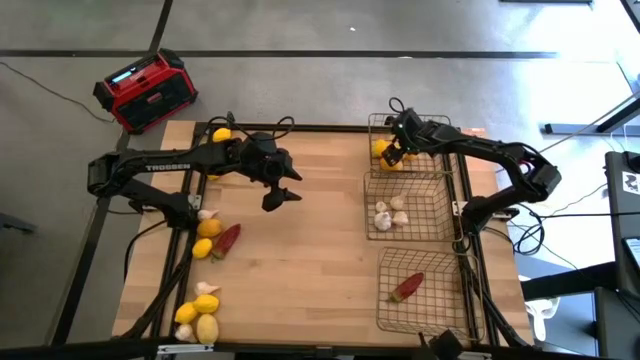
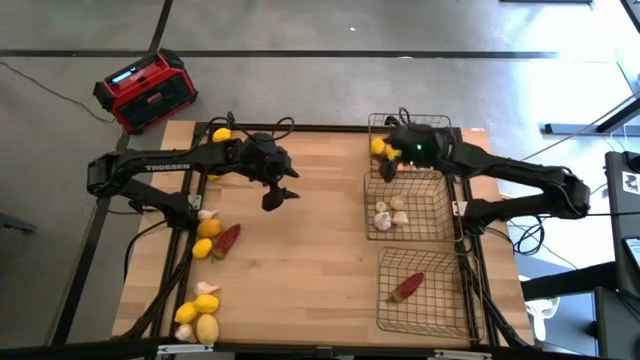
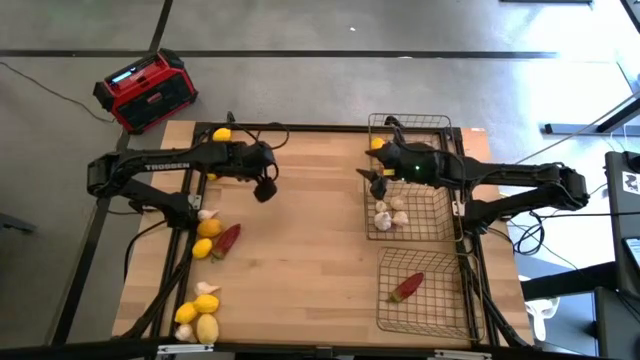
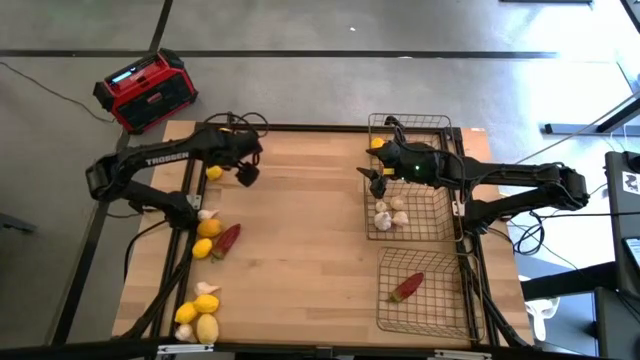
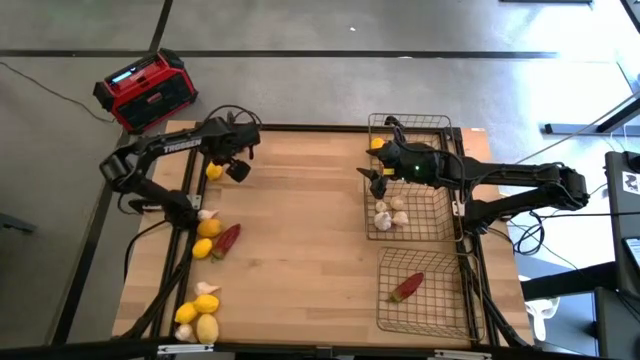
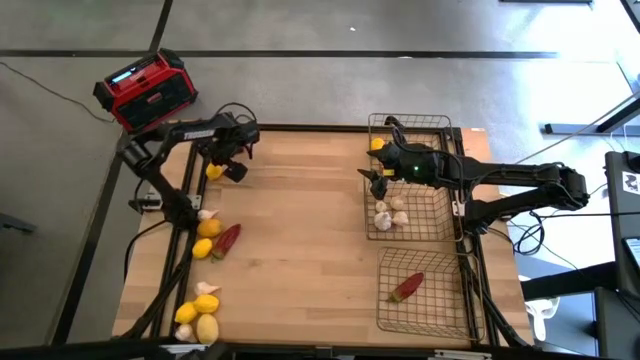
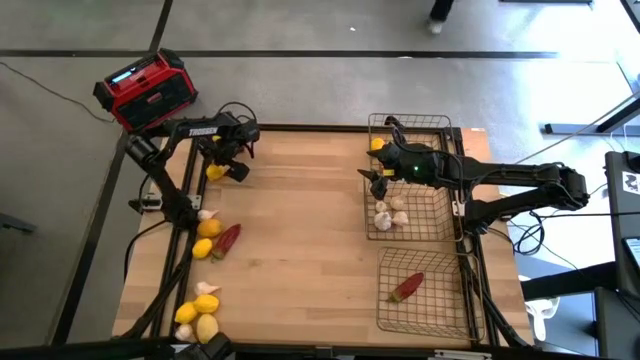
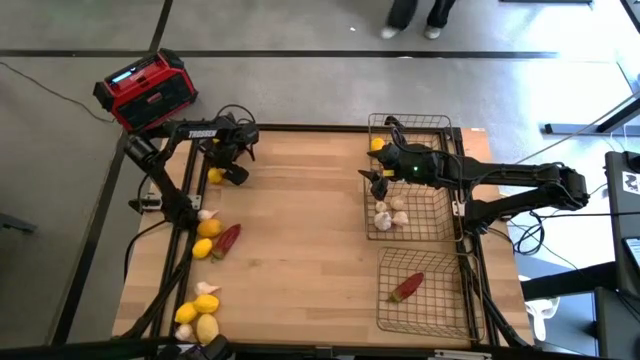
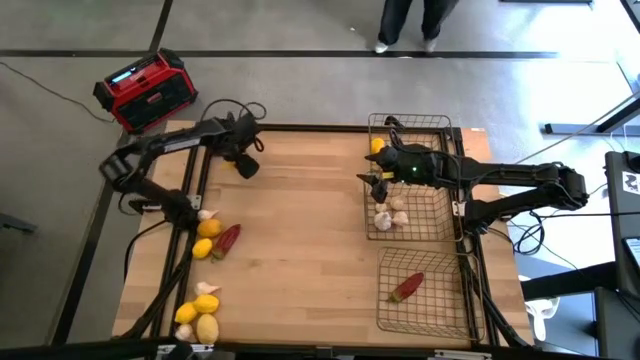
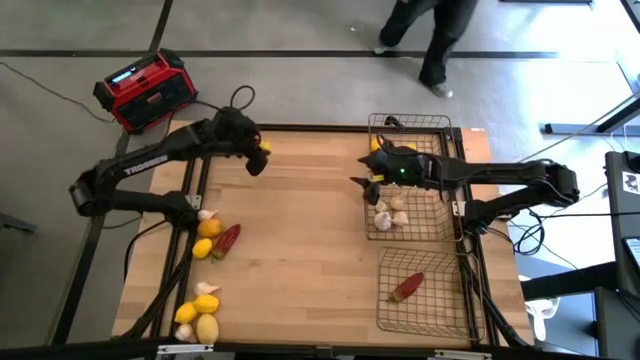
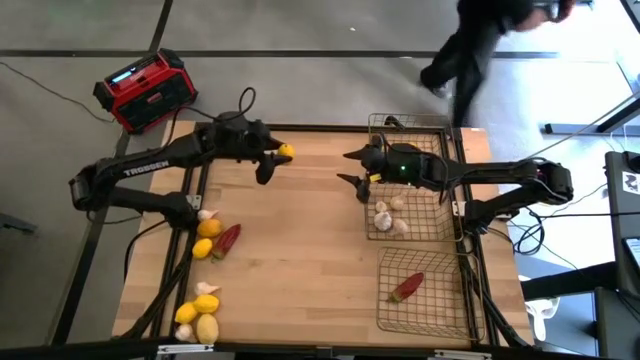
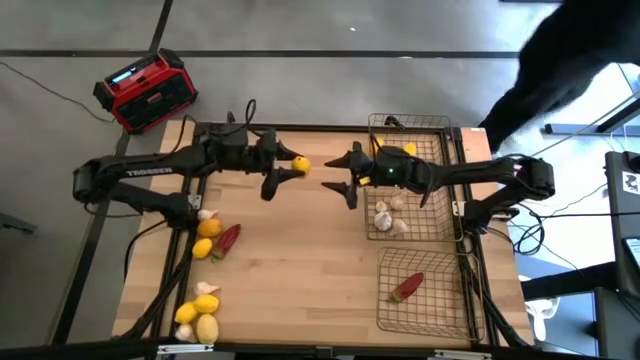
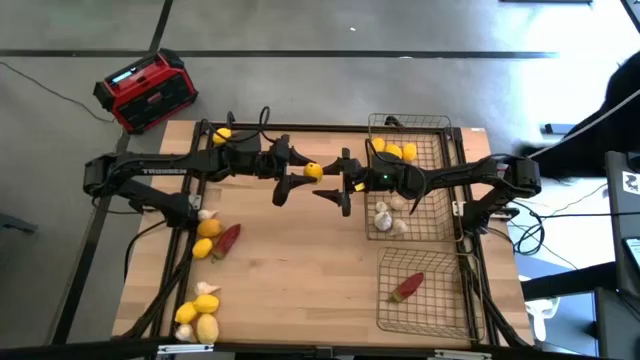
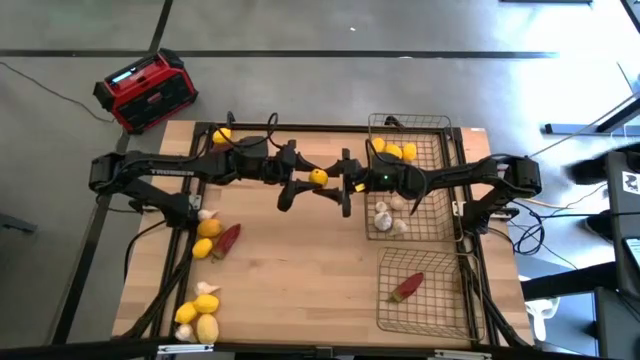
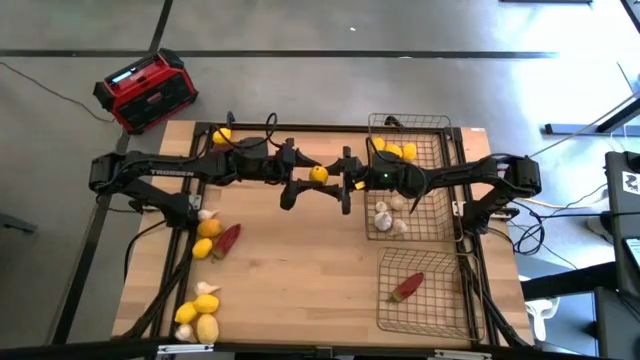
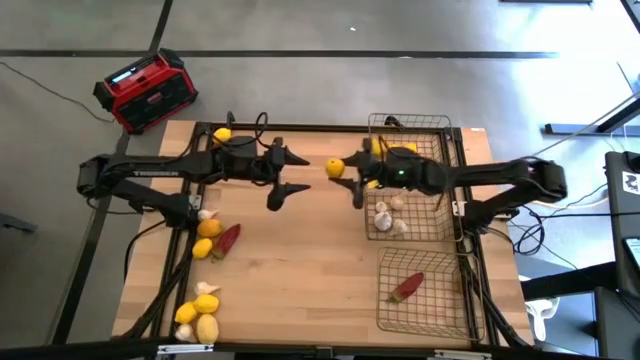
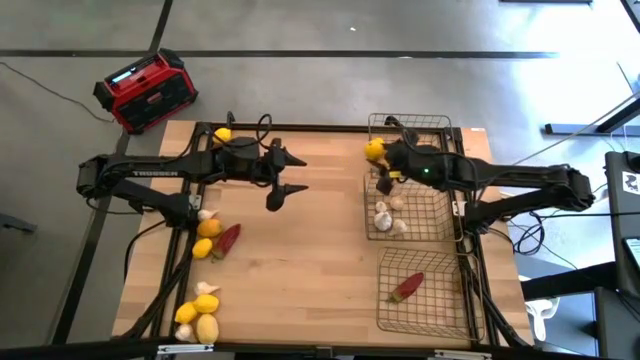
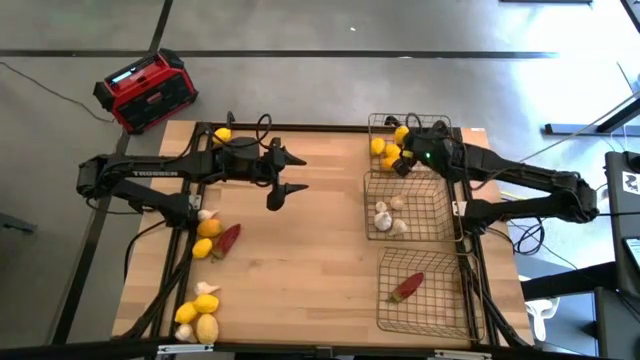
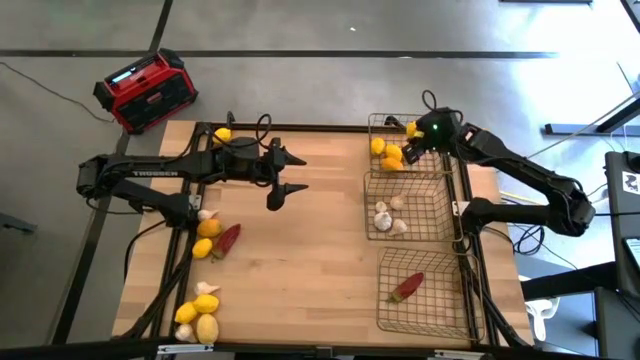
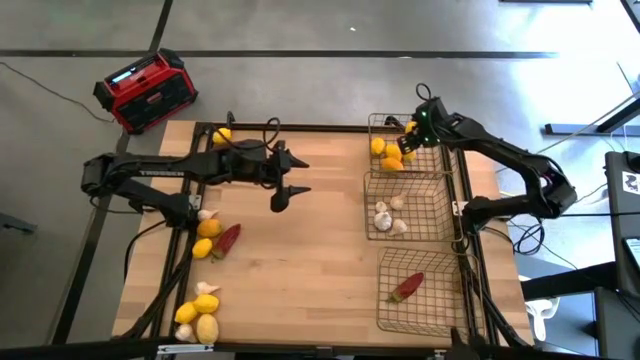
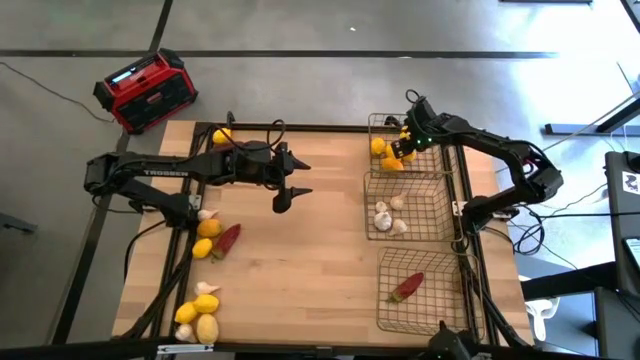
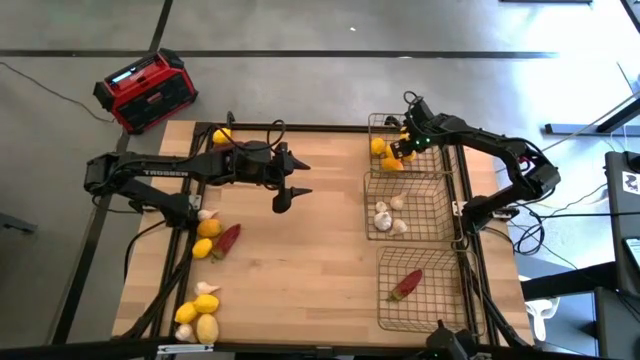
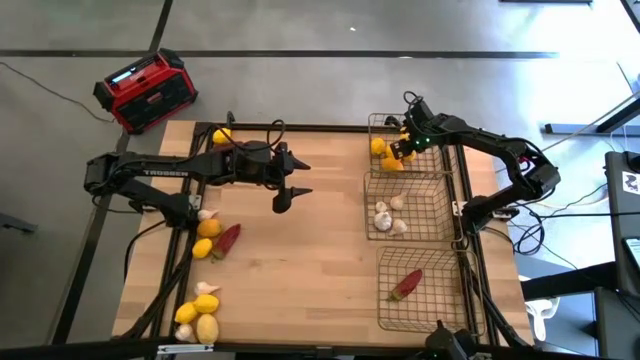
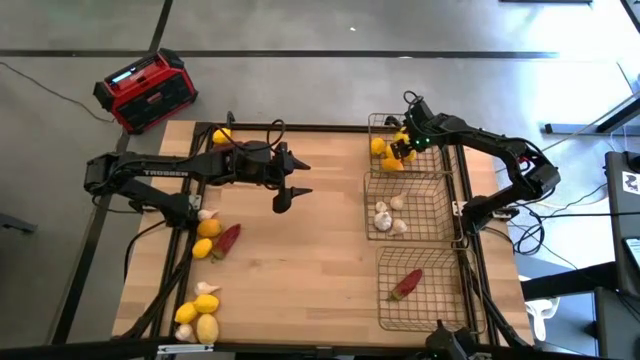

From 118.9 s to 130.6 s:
Task: Sort produce into baskets
Put the yellow lemon into the top wire basket

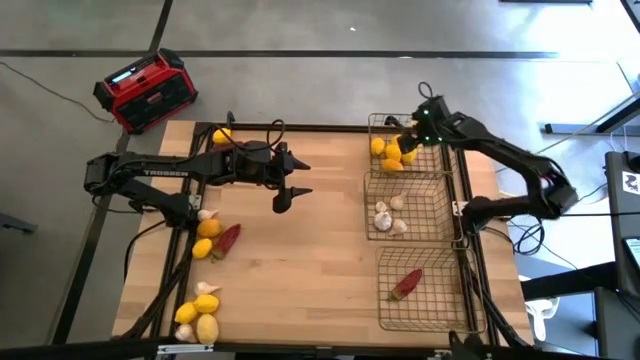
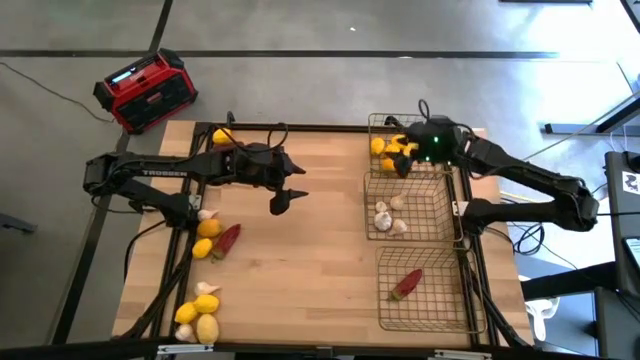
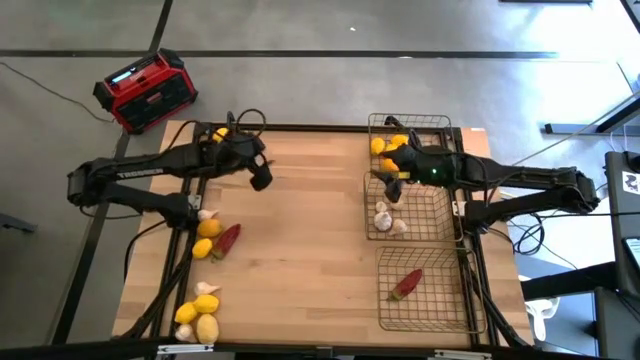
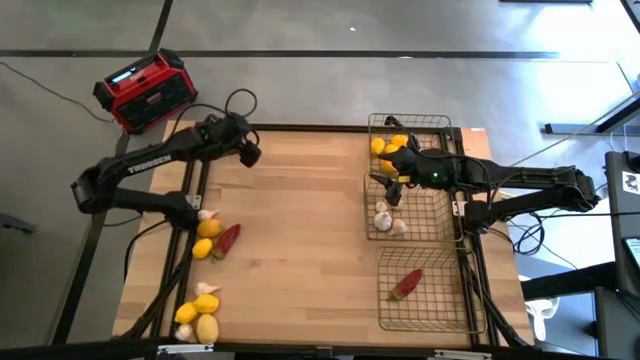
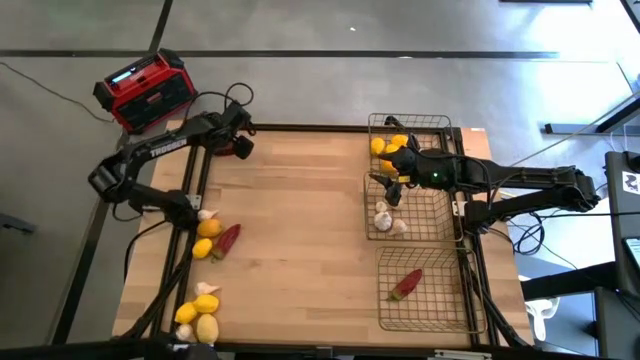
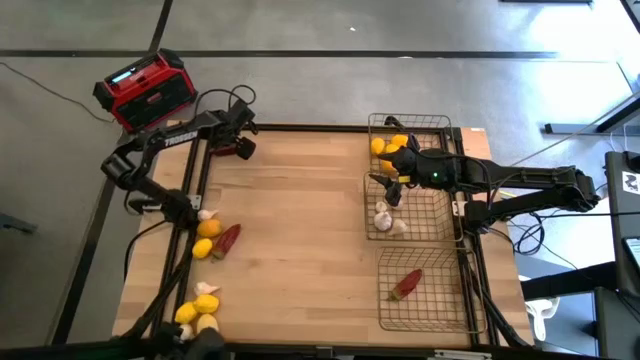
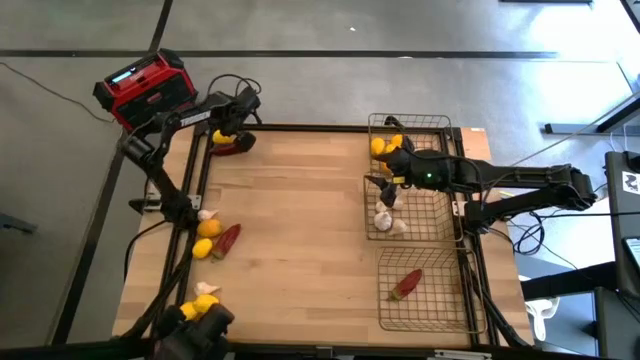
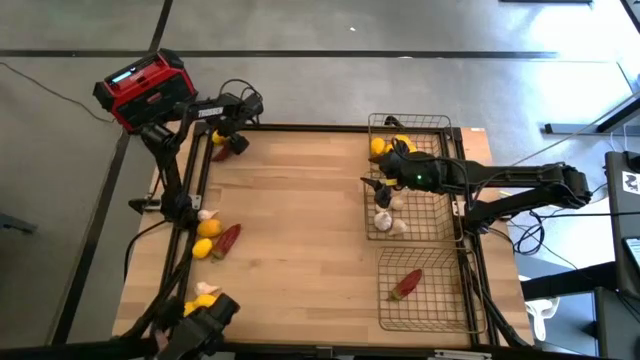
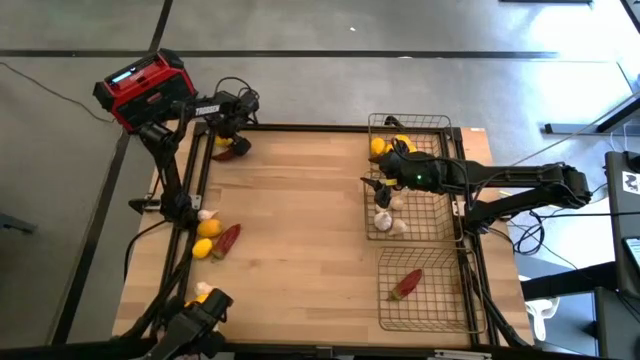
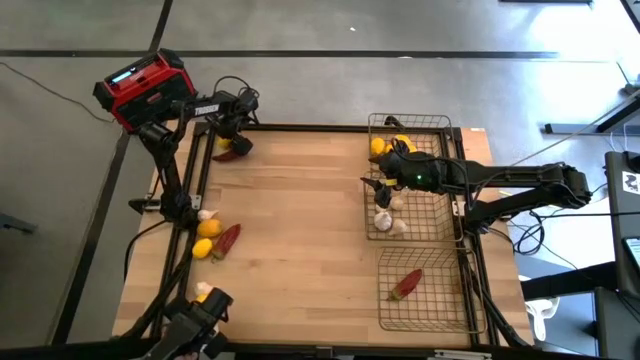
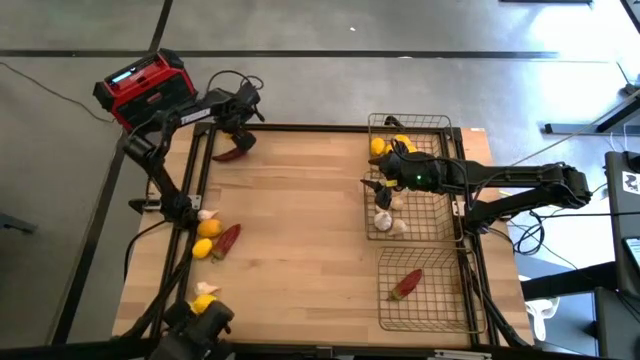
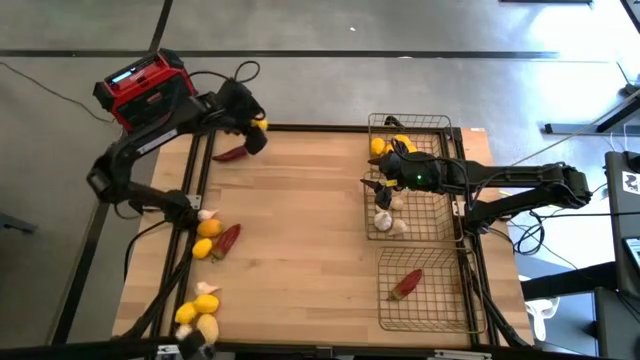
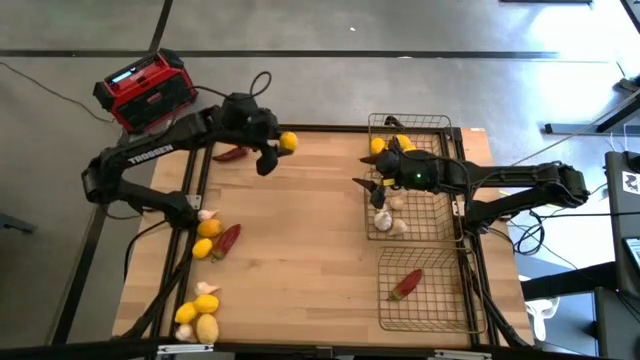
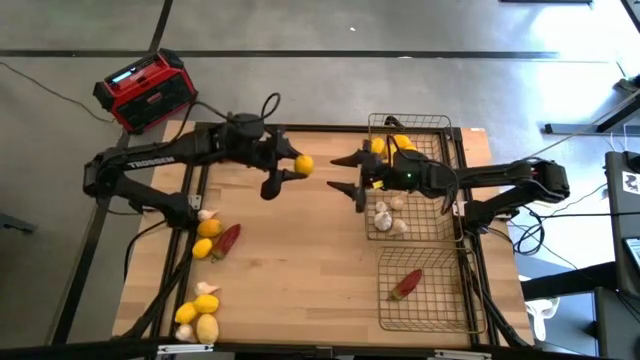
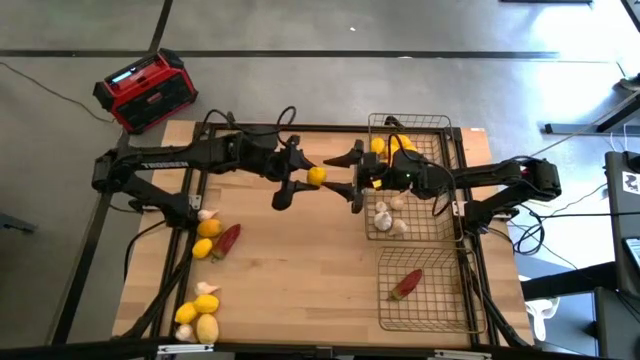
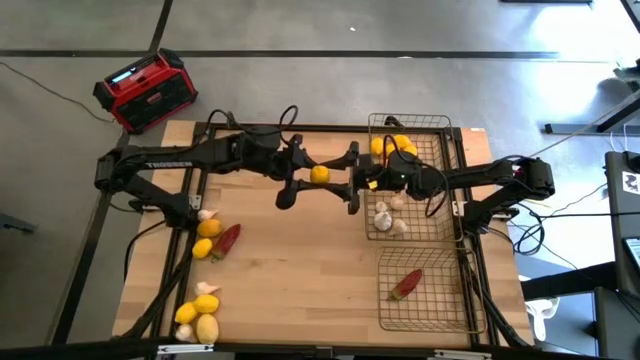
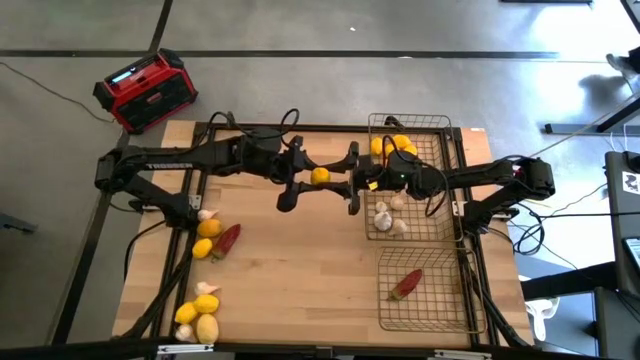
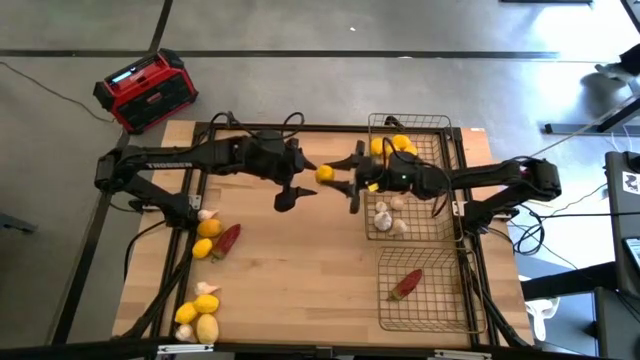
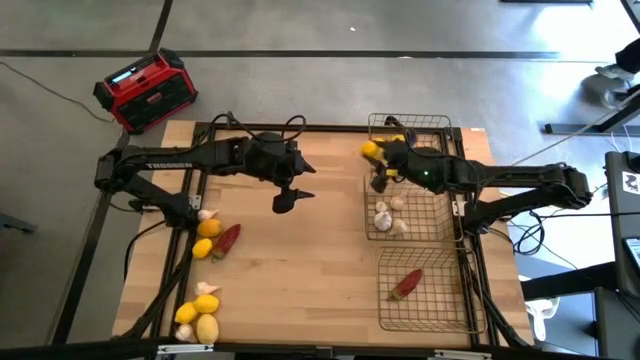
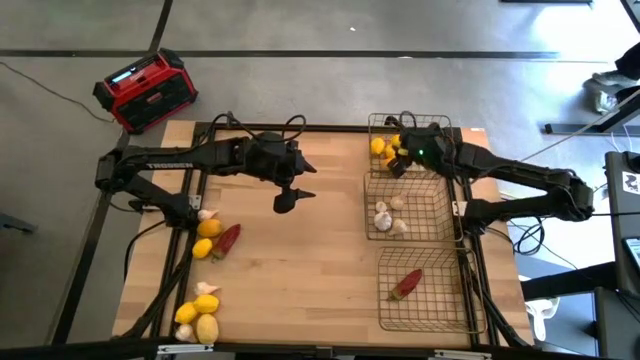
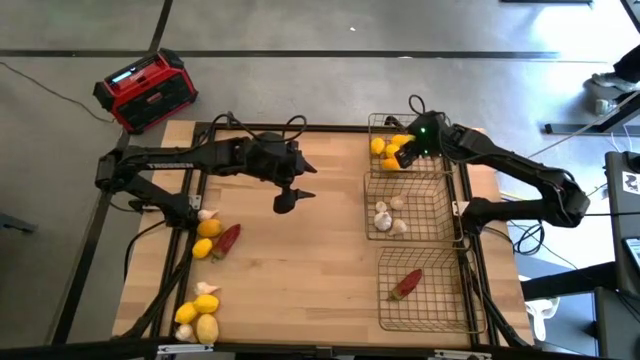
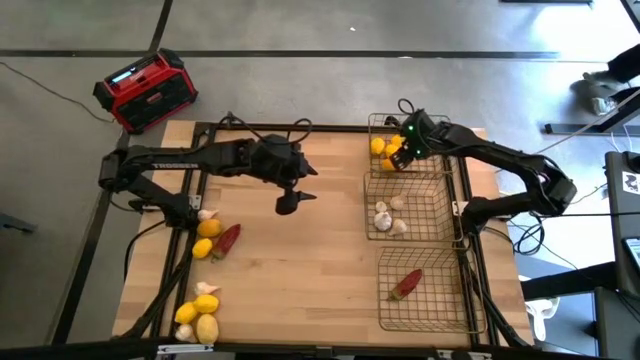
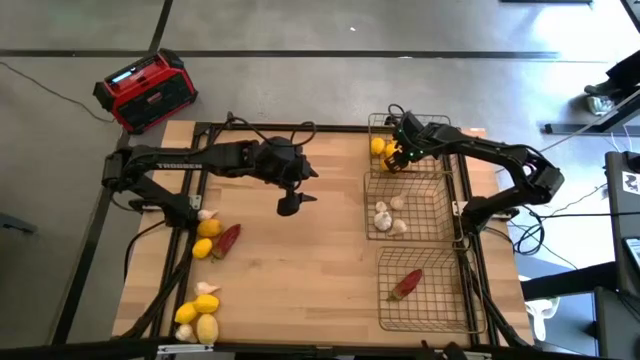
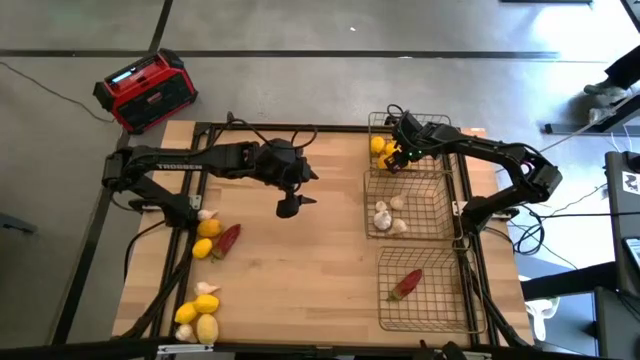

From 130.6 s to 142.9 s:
Put the yellow lemon into the top wire basket
